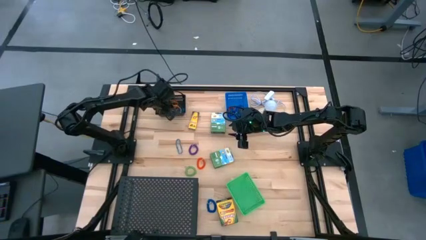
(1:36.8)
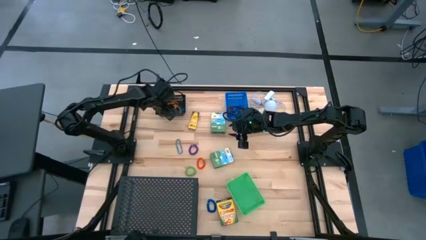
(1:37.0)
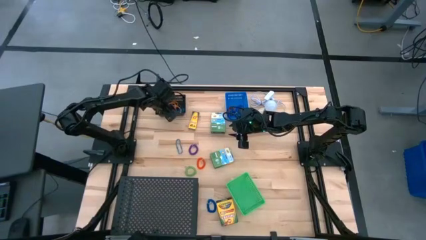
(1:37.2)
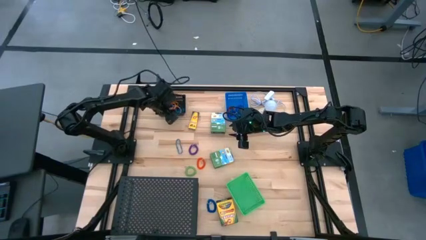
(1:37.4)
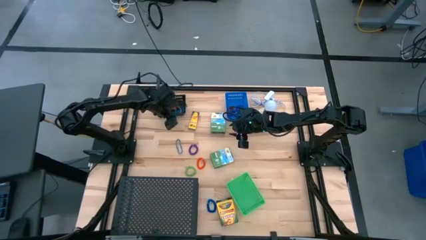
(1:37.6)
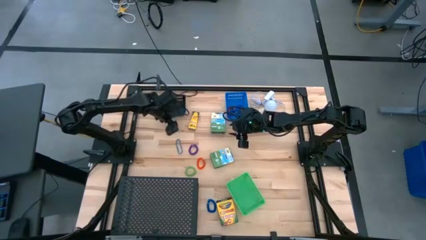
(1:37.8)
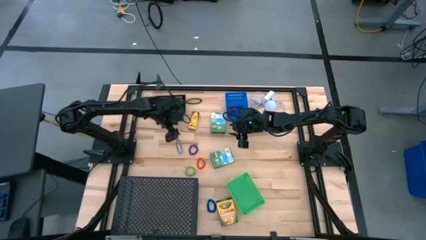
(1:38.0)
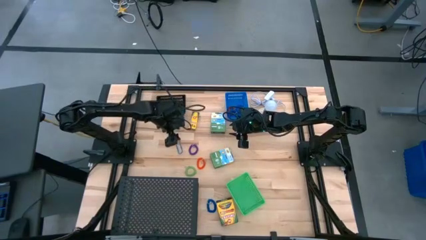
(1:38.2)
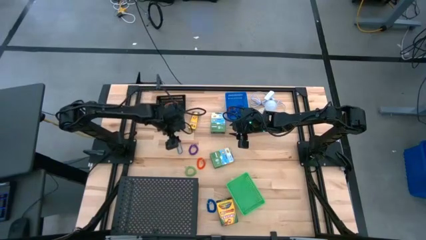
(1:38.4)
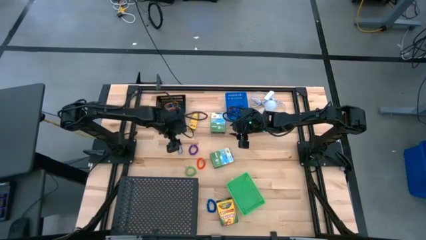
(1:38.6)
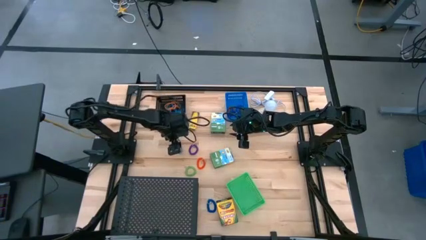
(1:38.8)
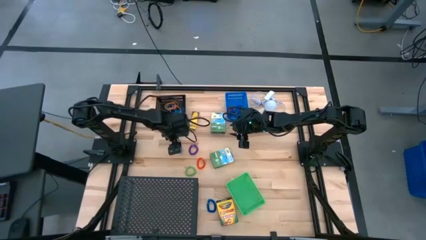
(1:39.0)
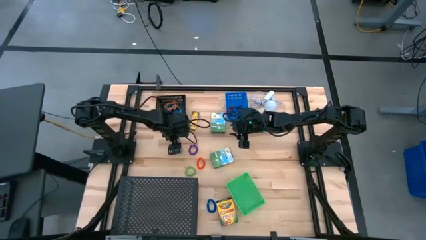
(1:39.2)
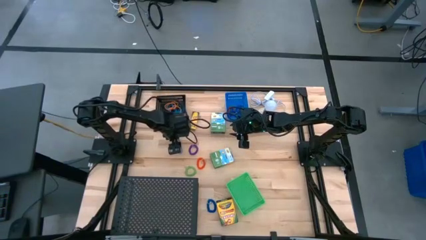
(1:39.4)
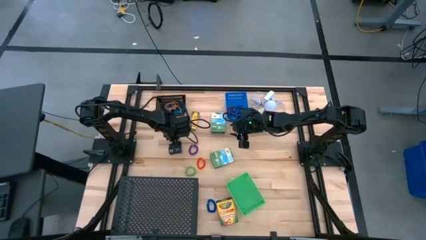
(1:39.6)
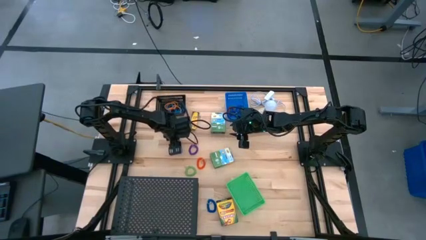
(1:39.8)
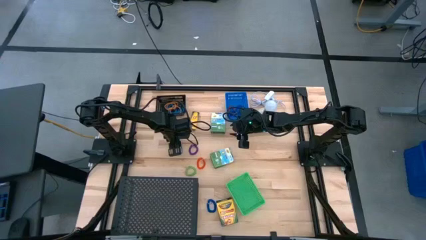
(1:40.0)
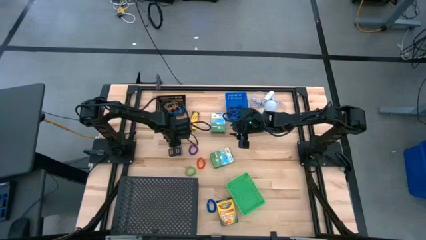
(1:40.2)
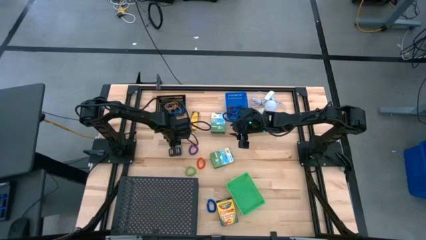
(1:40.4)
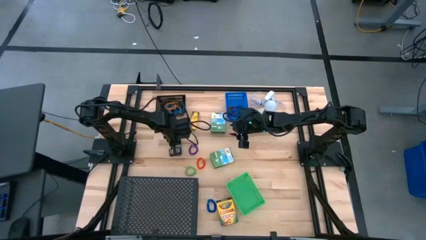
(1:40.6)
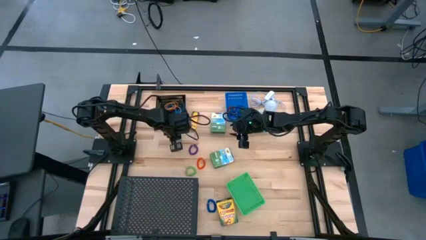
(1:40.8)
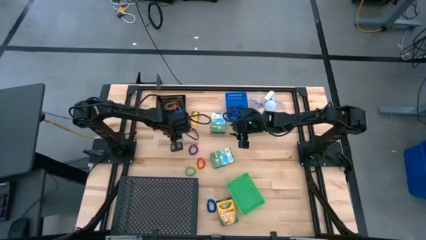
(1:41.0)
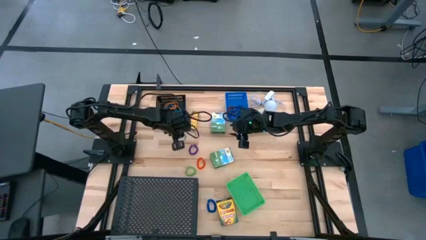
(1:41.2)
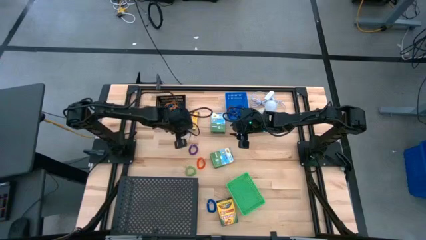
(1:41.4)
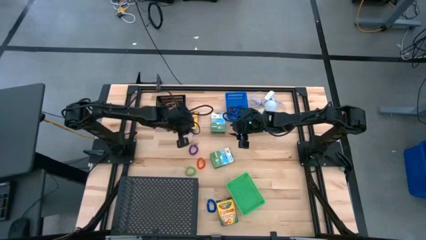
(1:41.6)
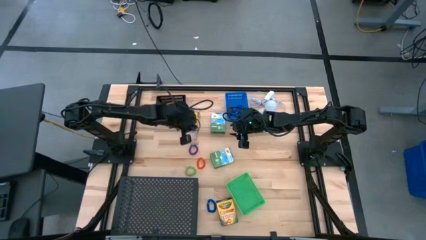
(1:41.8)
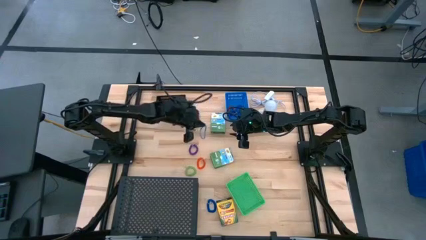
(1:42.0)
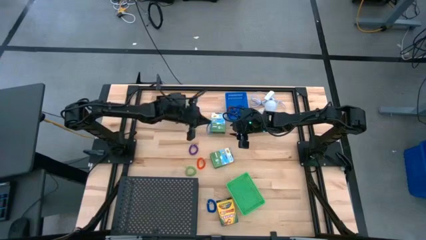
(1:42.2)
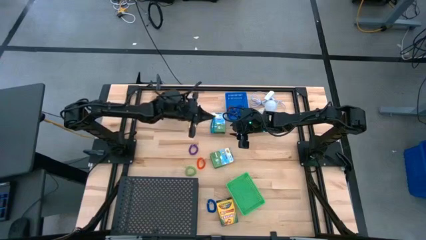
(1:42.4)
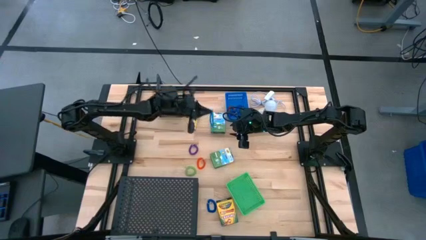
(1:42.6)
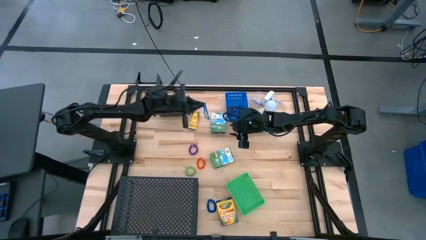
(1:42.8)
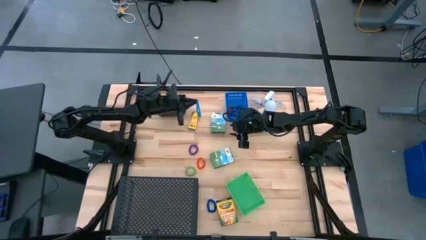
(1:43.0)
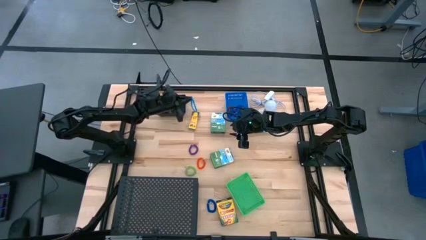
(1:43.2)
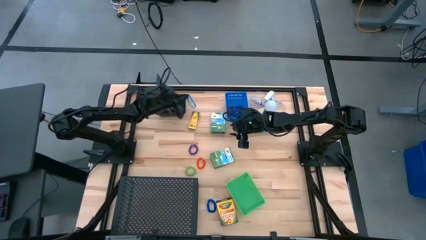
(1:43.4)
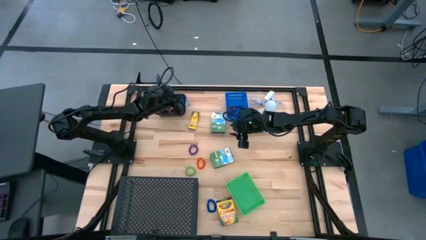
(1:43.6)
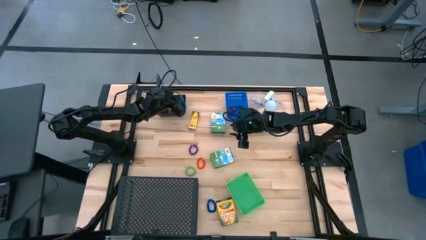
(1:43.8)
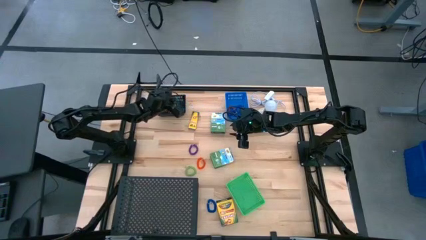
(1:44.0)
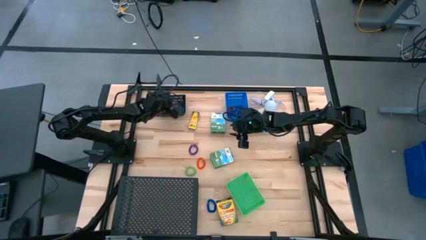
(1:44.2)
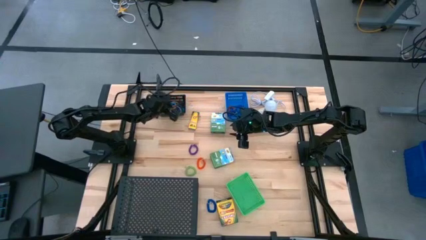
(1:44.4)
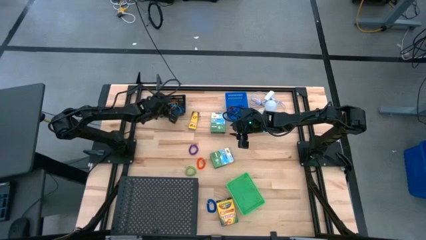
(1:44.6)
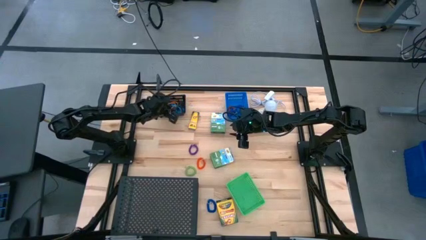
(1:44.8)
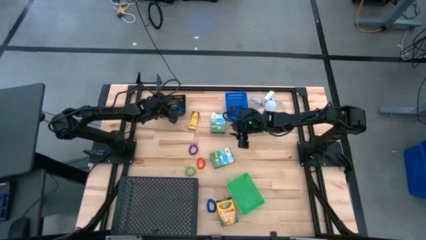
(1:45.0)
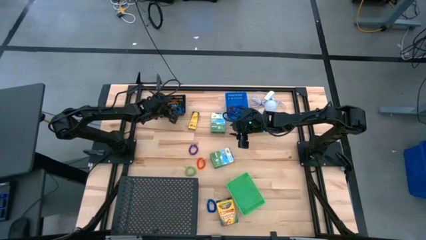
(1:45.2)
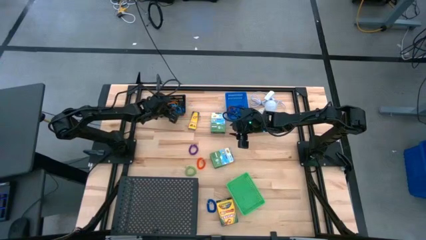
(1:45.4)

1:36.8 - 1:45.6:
Task: Pick & Place Office Desk Supplies
Put the blue rubber band into the black bin

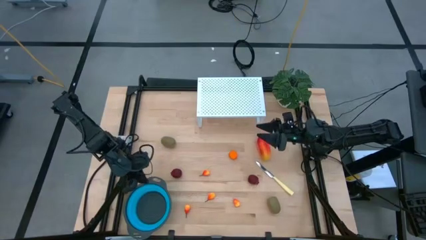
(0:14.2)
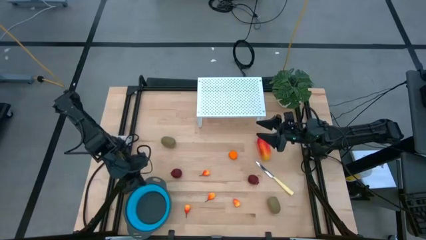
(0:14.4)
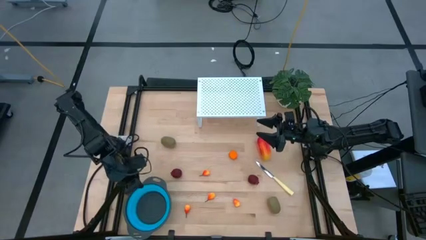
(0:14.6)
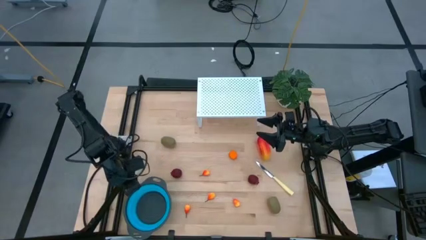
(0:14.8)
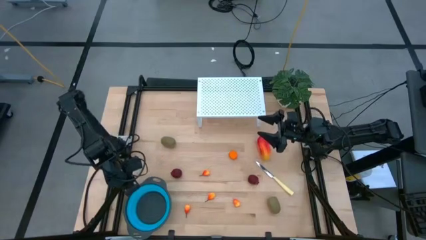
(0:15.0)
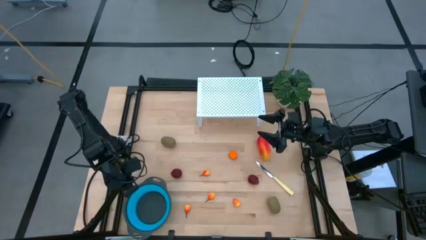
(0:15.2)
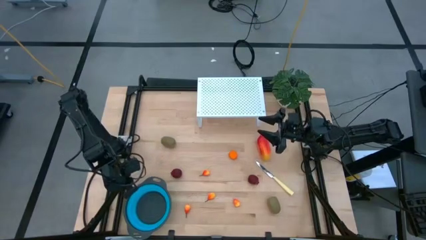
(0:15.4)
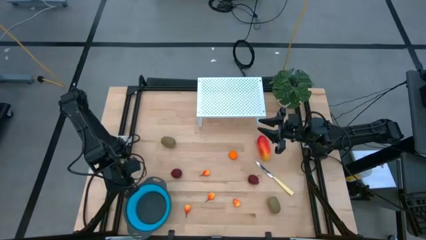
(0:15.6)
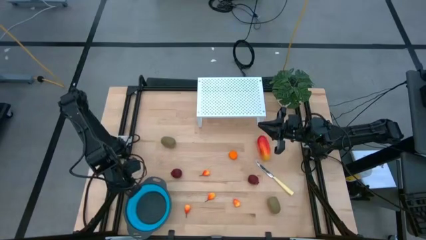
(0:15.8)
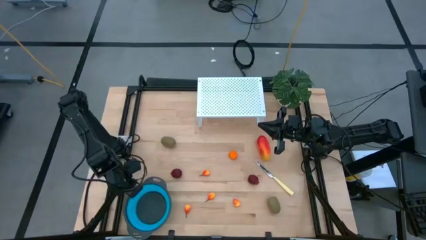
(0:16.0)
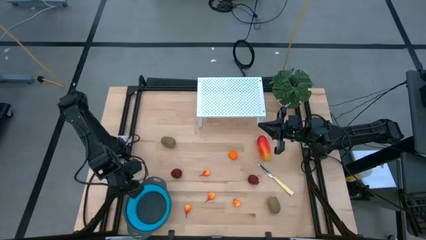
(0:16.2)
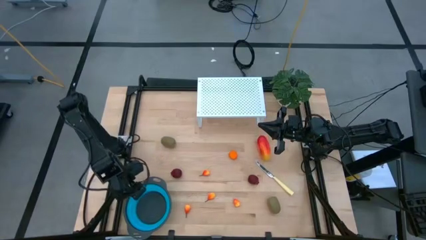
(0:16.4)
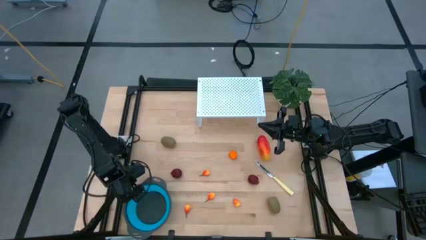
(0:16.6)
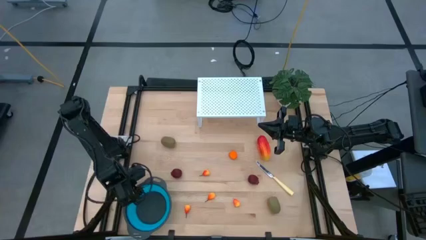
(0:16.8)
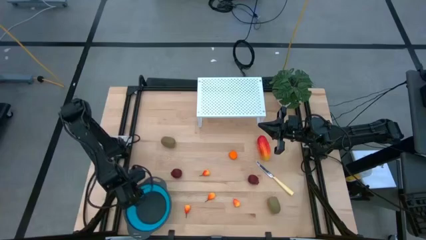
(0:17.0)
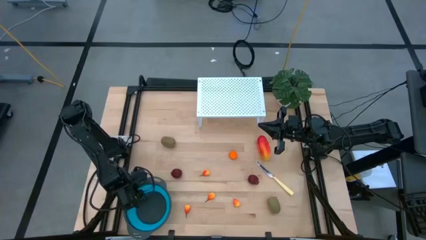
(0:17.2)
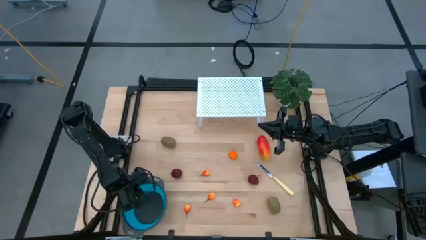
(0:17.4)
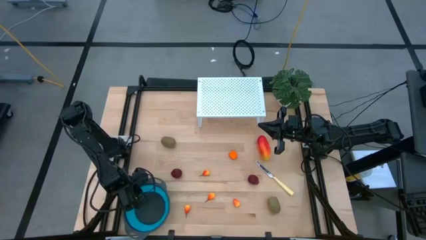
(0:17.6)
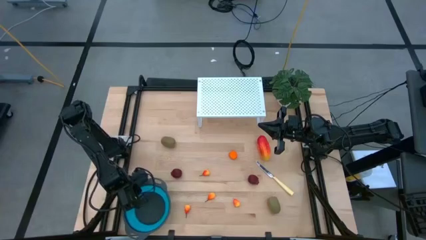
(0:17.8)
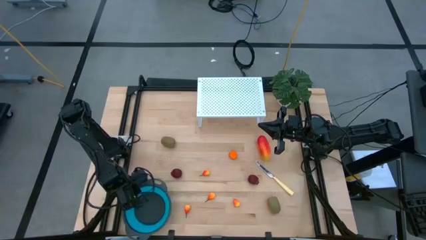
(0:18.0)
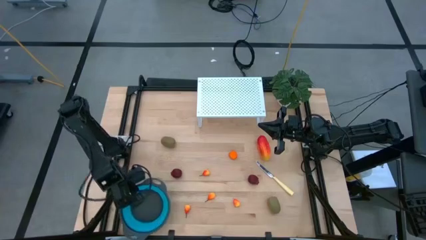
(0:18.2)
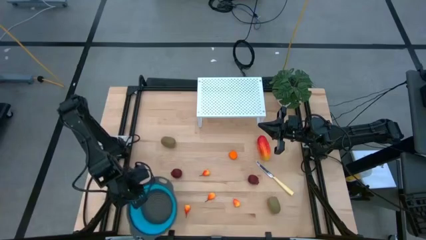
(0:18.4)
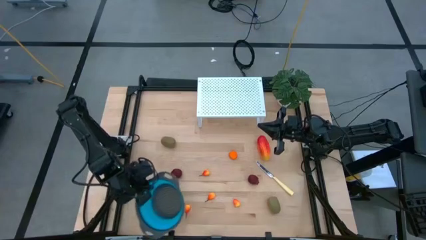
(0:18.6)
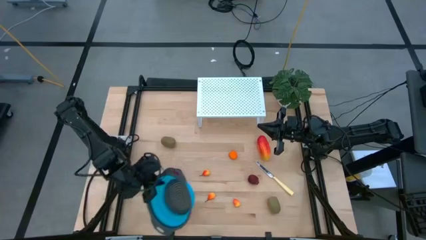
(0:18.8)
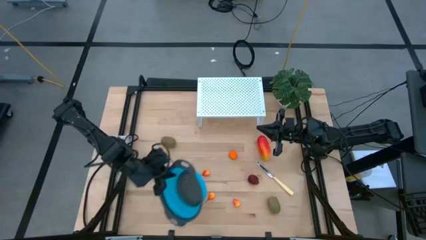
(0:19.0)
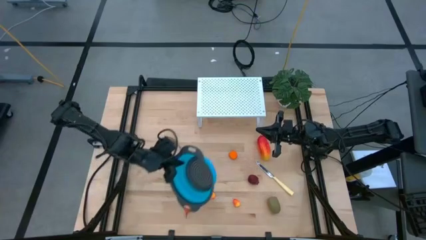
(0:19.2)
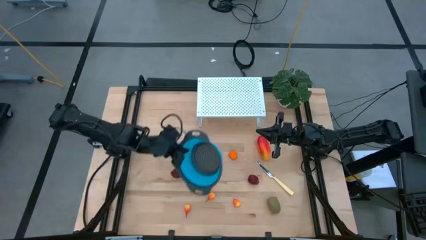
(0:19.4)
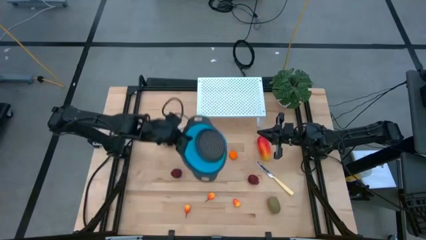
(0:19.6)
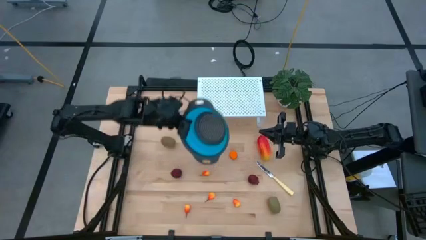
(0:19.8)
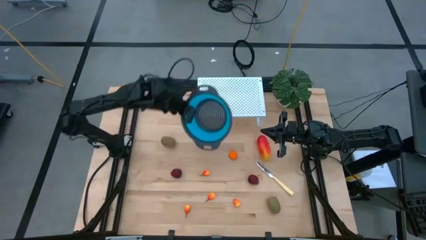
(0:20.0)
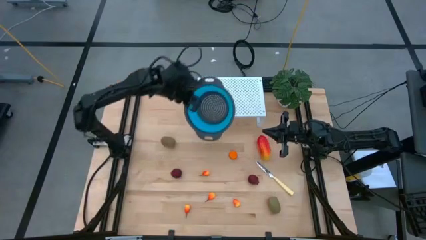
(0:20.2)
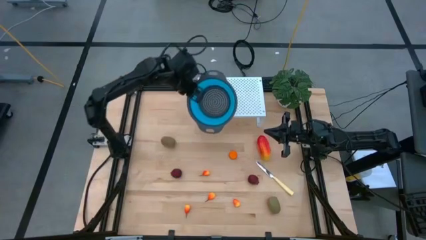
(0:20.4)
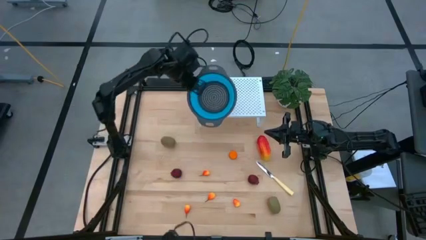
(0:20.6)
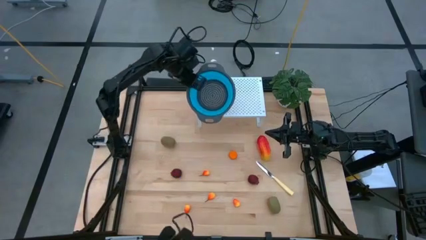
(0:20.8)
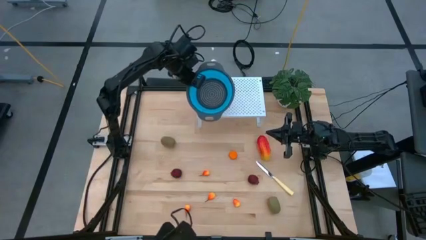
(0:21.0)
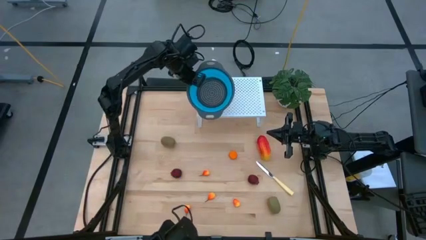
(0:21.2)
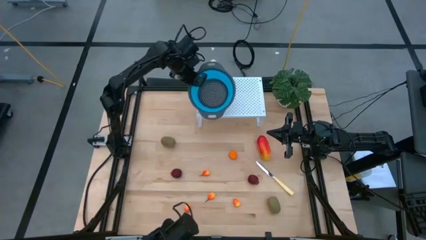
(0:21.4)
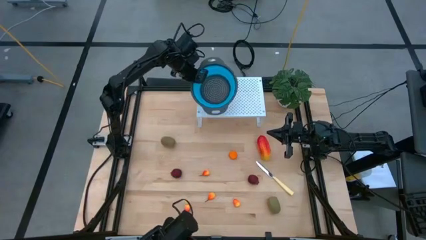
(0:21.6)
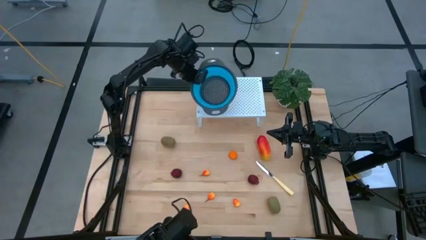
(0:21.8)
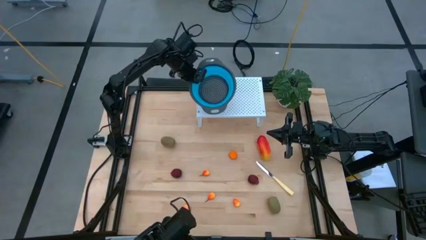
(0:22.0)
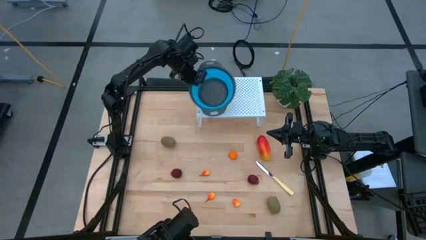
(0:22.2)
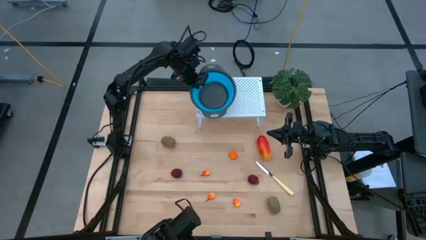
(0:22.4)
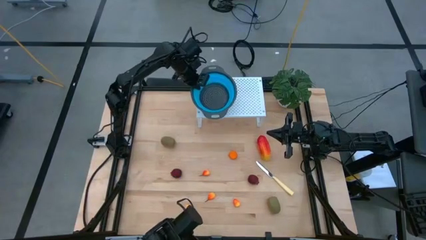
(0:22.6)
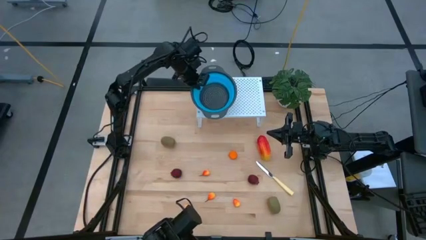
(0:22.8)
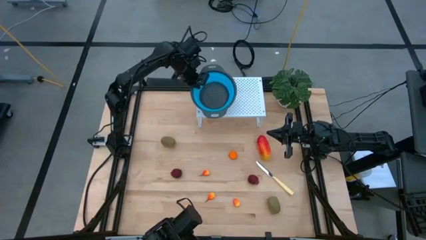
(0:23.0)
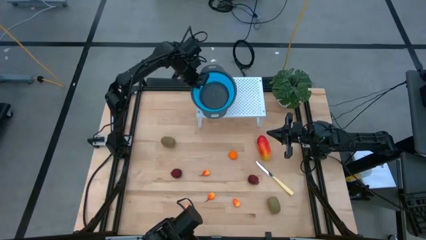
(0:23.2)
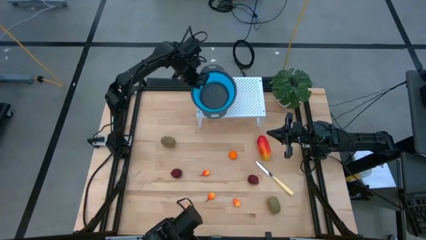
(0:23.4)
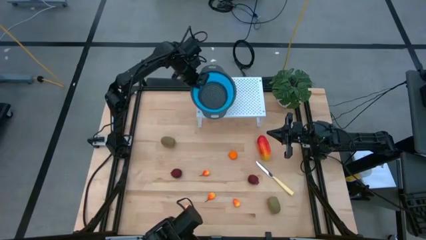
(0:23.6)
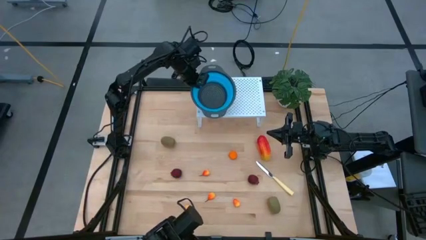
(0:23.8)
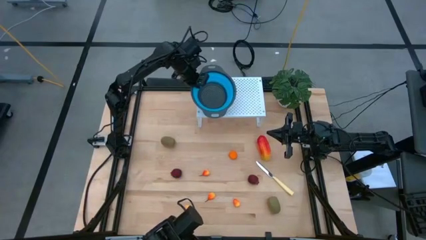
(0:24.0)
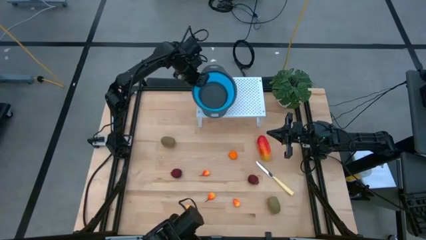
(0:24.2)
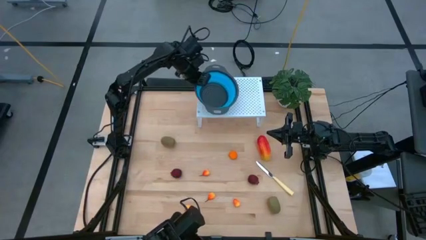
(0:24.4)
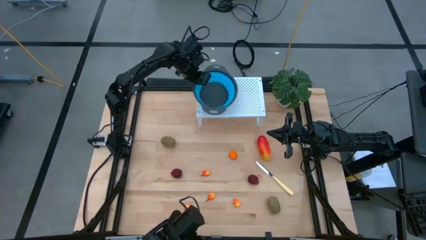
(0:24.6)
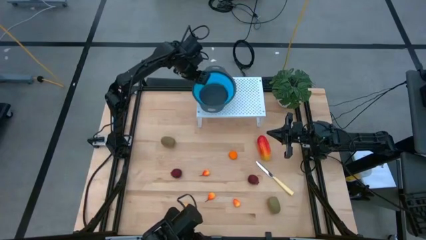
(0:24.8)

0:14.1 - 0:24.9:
Task: Pick & Place Fruit
Put the blue strainer bowl on the shelf
